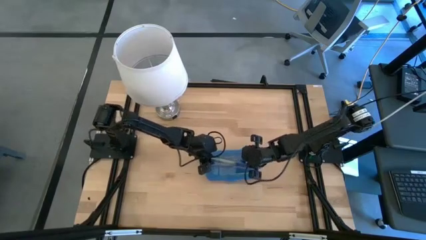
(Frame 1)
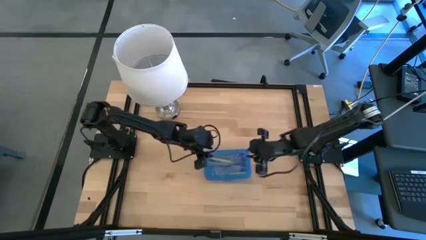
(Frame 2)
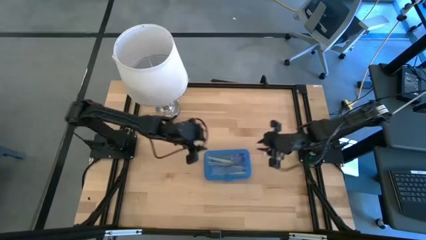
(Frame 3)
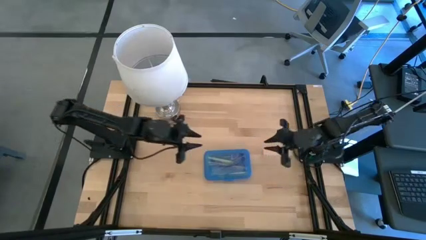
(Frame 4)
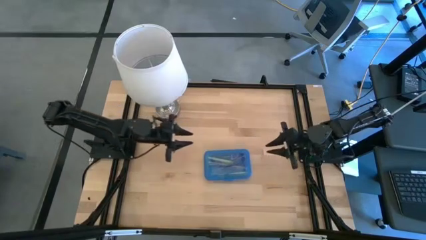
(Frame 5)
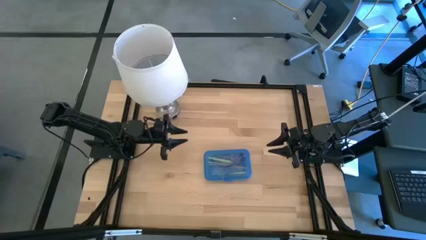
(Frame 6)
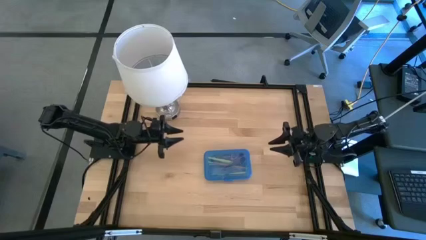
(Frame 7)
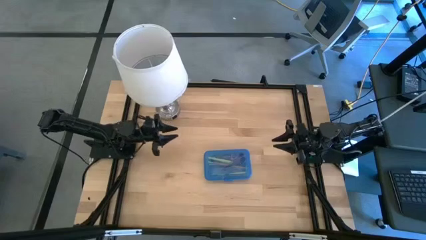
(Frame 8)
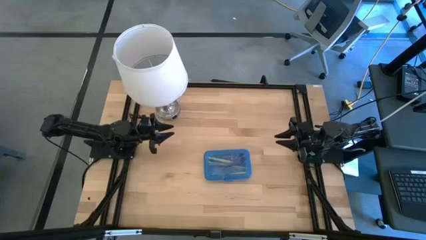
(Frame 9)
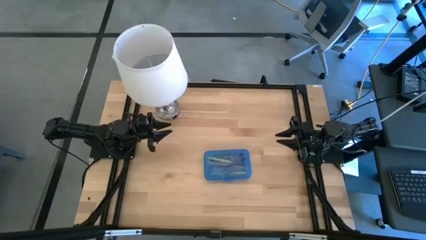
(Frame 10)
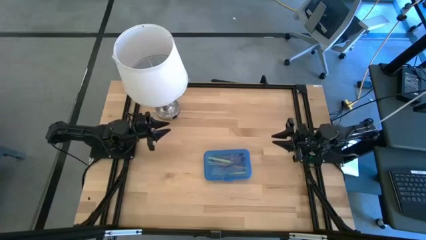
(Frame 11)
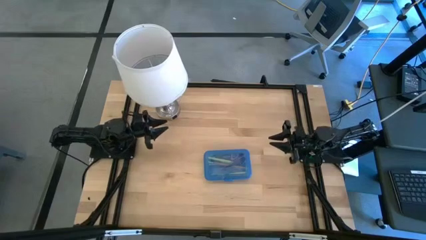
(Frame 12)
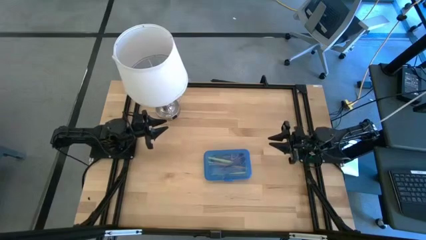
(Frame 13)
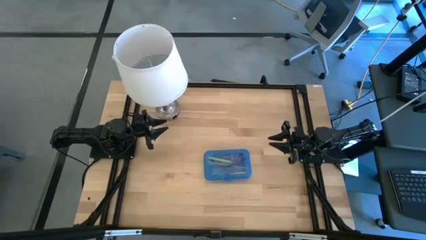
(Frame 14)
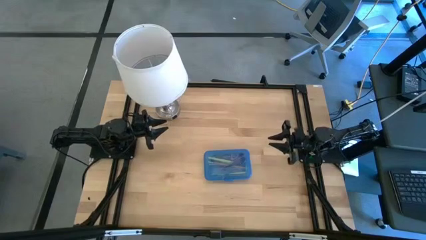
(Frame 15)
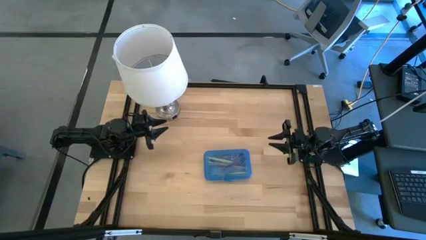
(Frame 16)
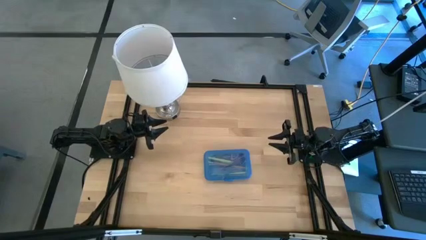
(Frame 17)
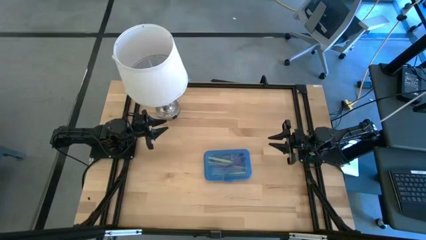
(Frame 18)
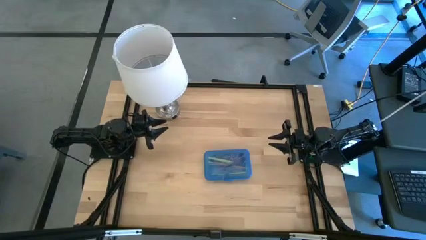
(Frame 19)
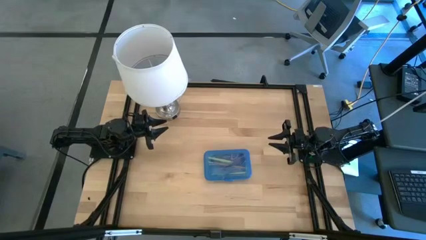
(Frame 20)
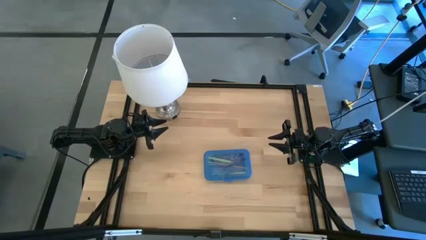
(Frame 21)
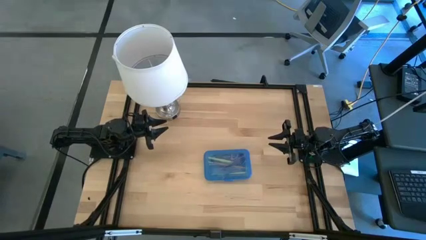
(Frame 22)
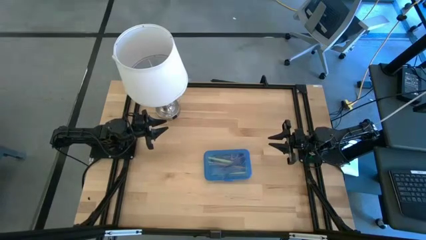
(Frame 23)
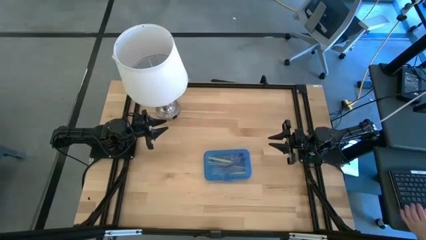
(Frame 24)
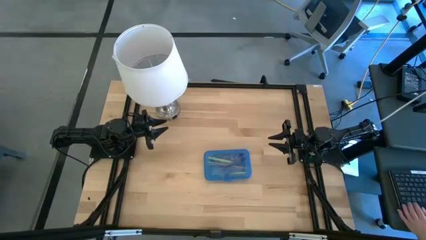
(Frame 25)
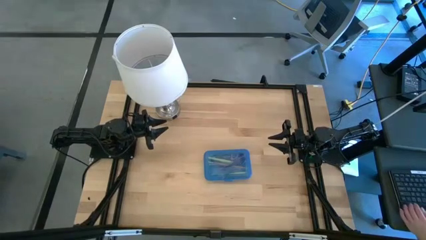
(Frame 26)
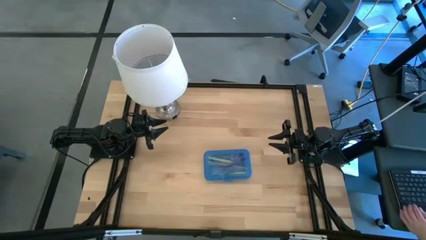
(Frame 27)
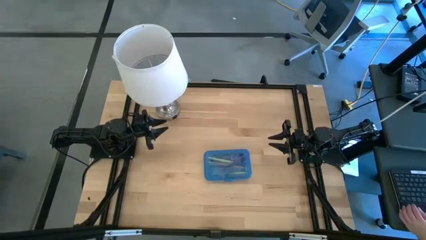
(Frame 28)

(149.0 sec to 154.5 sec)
Task: Pick & place school supplies into a supply box
Return to Home Position
